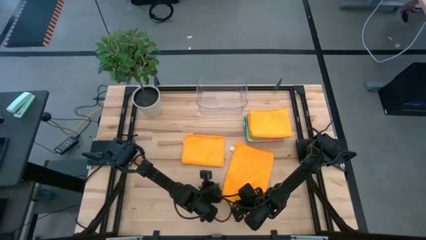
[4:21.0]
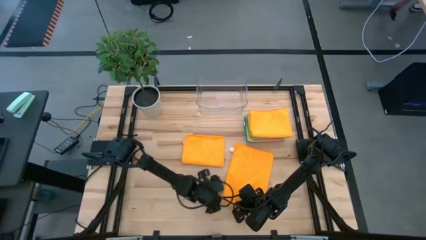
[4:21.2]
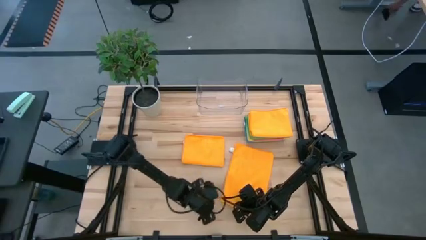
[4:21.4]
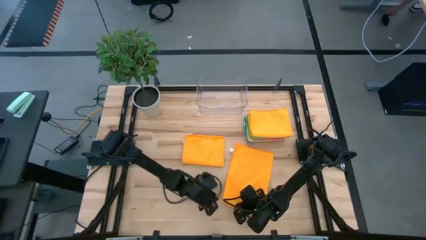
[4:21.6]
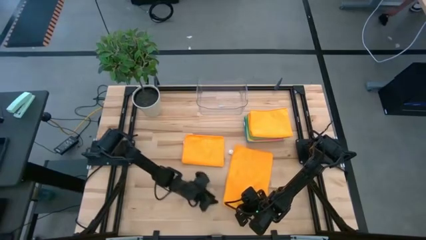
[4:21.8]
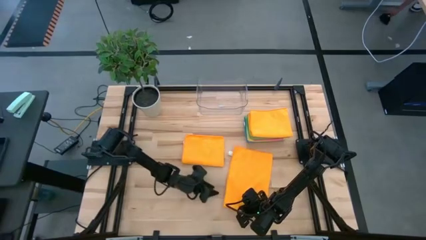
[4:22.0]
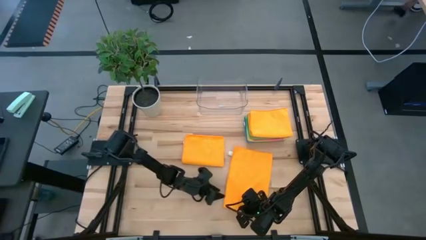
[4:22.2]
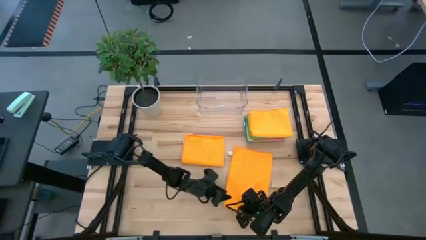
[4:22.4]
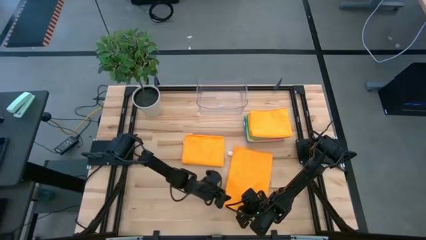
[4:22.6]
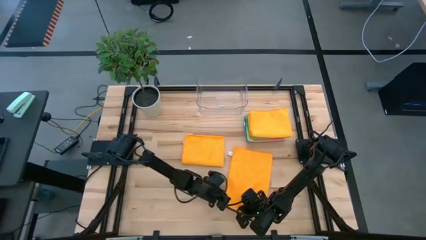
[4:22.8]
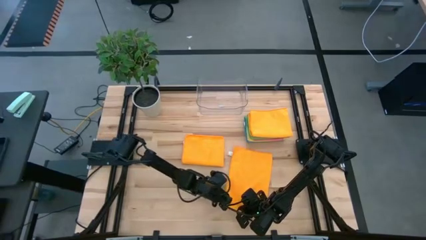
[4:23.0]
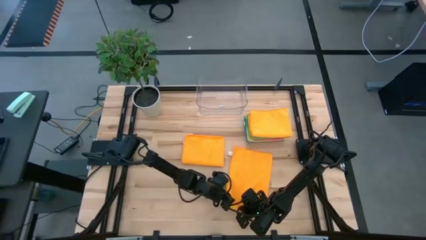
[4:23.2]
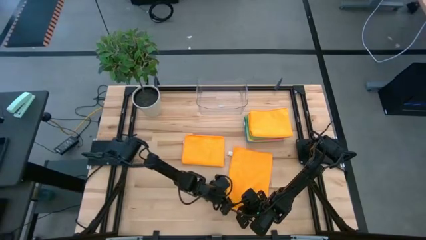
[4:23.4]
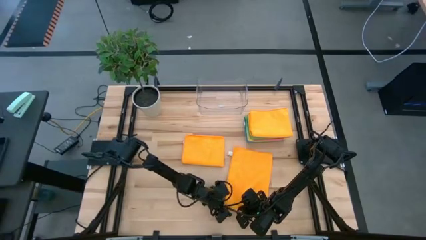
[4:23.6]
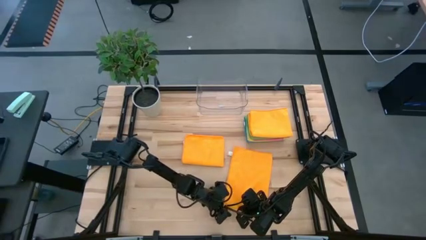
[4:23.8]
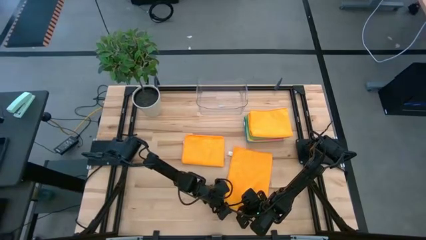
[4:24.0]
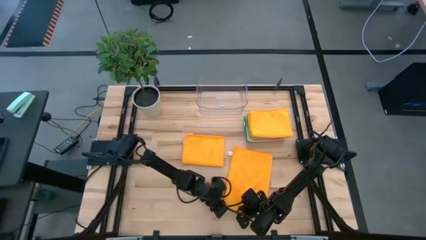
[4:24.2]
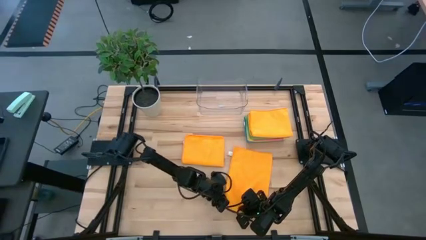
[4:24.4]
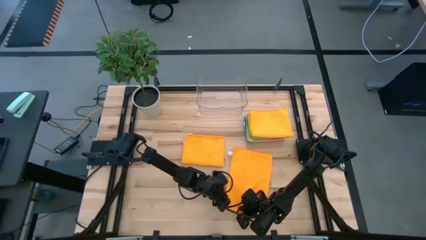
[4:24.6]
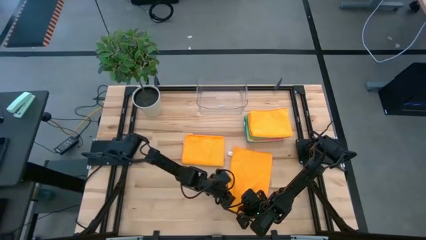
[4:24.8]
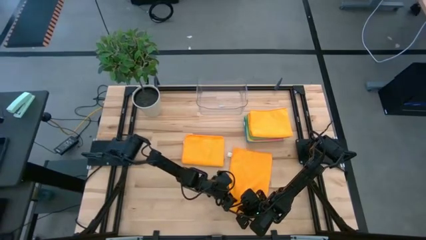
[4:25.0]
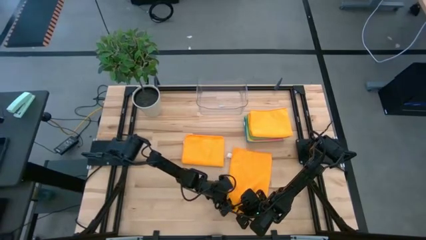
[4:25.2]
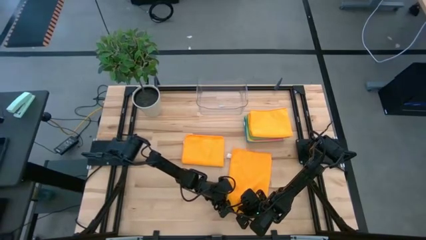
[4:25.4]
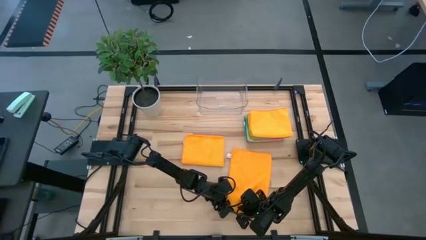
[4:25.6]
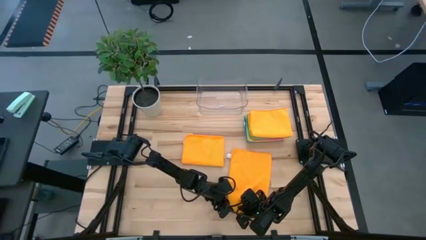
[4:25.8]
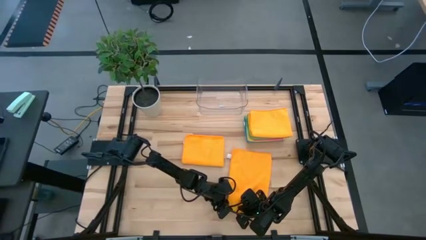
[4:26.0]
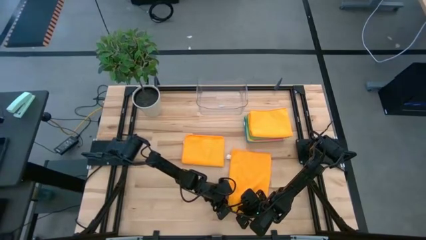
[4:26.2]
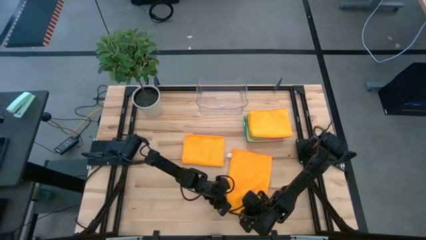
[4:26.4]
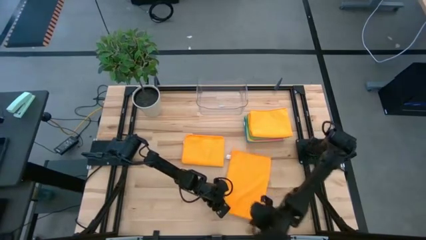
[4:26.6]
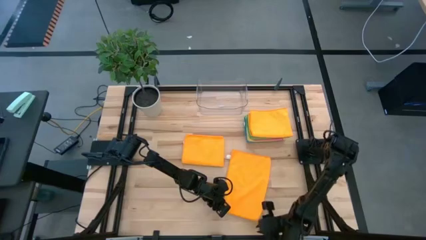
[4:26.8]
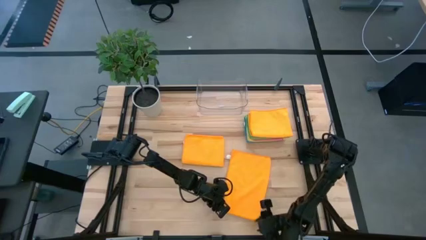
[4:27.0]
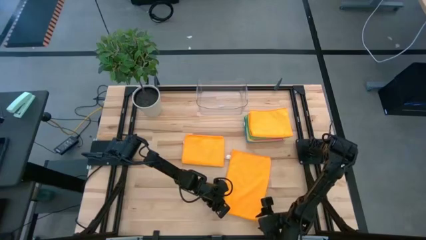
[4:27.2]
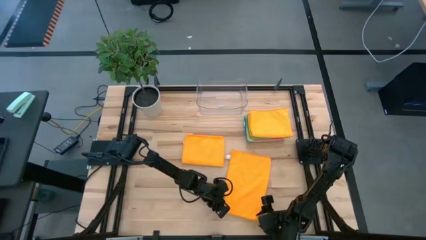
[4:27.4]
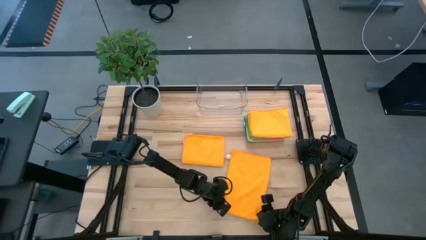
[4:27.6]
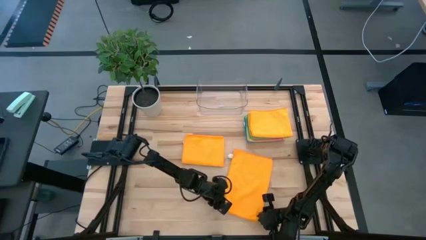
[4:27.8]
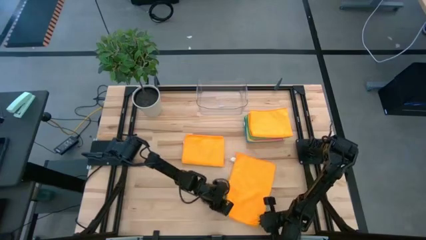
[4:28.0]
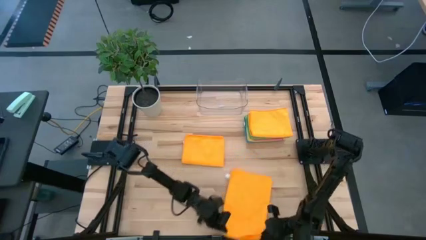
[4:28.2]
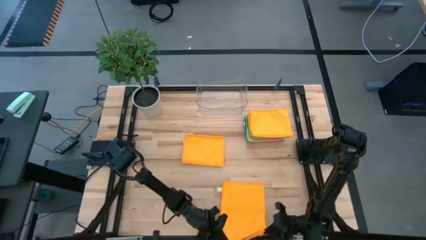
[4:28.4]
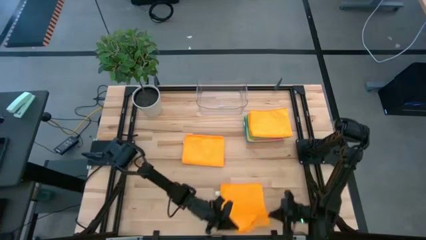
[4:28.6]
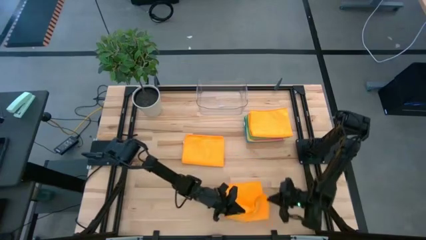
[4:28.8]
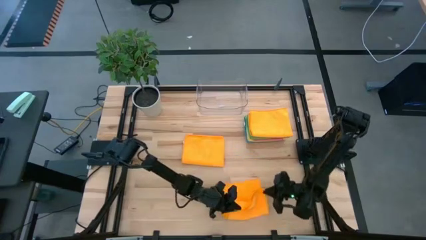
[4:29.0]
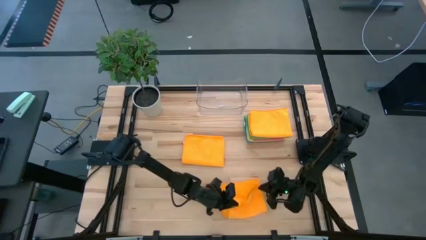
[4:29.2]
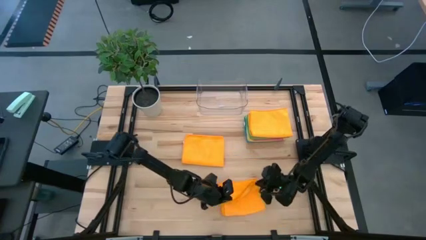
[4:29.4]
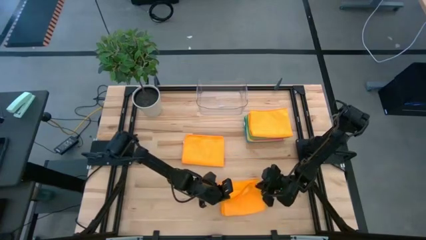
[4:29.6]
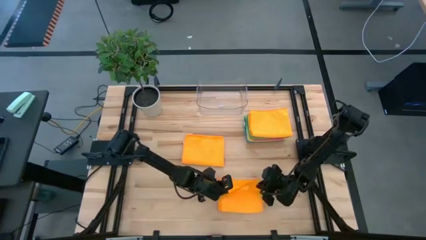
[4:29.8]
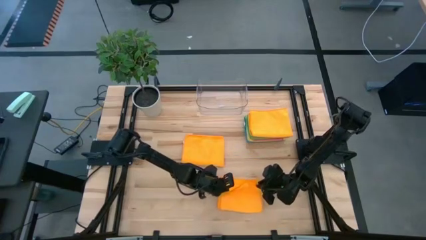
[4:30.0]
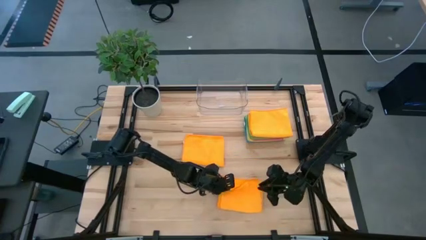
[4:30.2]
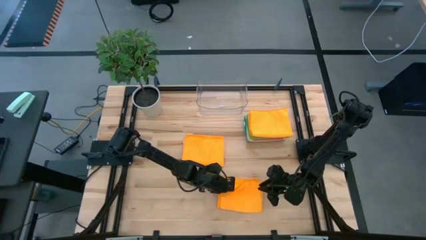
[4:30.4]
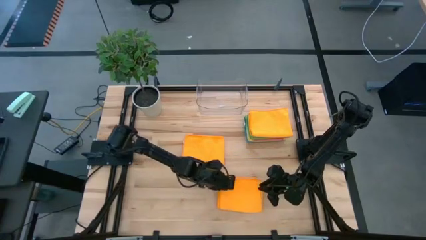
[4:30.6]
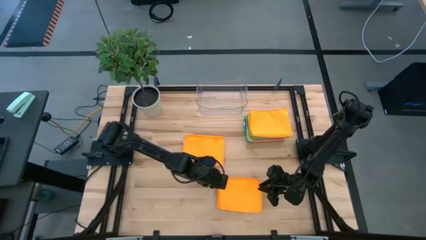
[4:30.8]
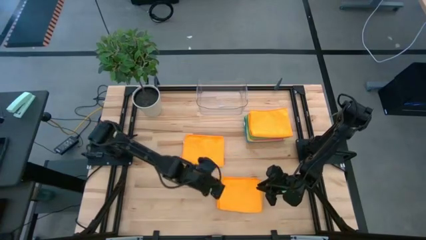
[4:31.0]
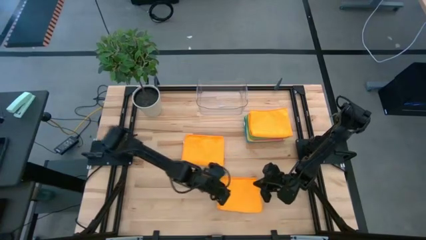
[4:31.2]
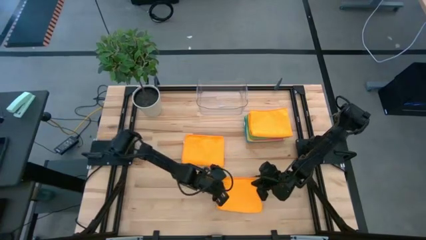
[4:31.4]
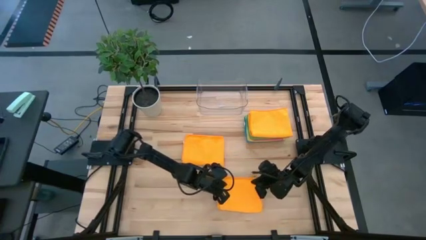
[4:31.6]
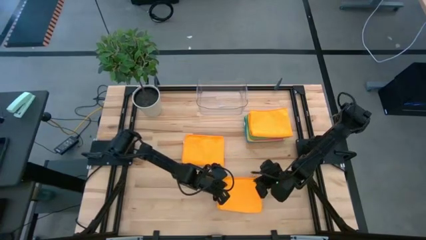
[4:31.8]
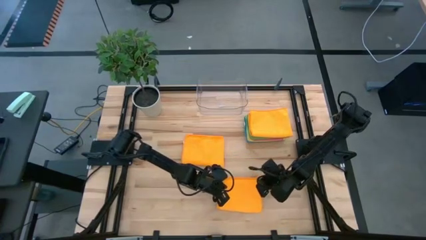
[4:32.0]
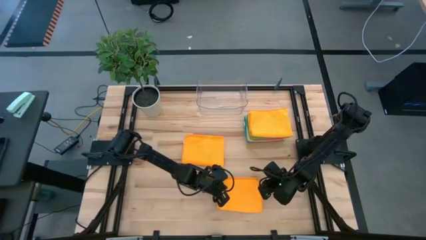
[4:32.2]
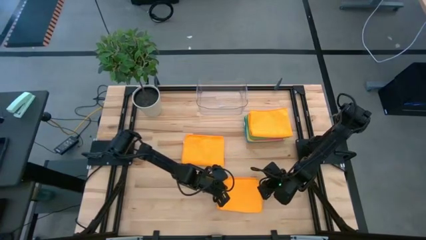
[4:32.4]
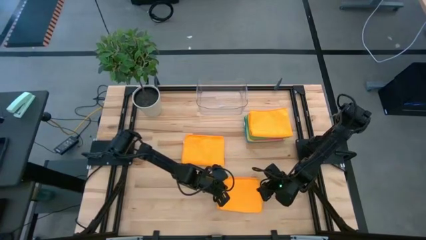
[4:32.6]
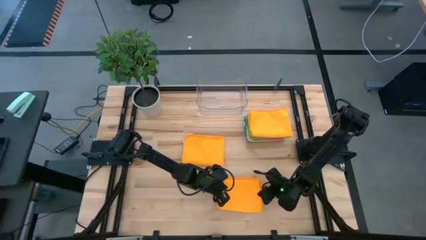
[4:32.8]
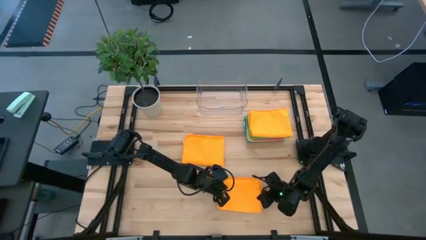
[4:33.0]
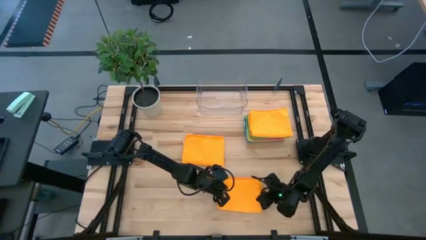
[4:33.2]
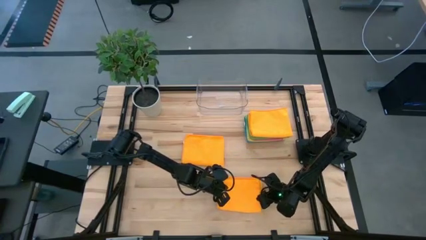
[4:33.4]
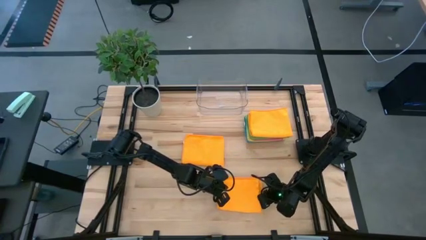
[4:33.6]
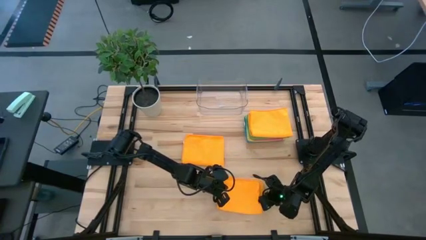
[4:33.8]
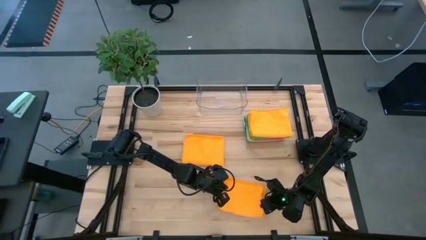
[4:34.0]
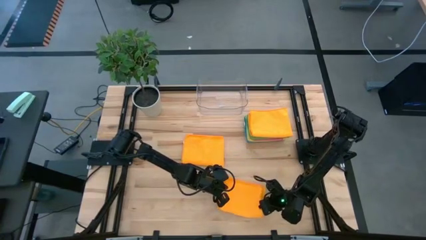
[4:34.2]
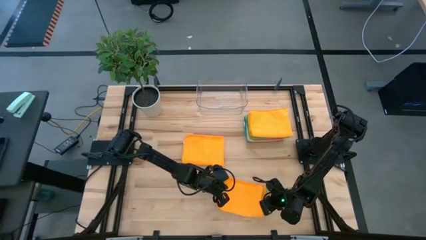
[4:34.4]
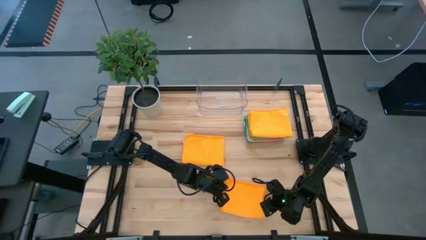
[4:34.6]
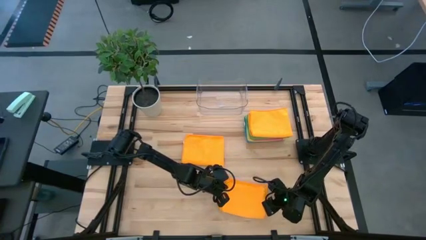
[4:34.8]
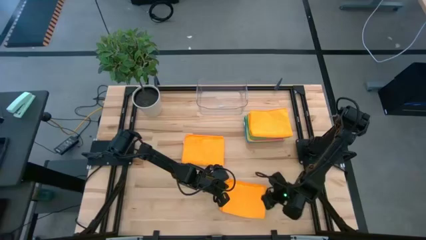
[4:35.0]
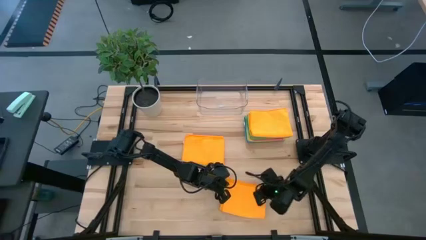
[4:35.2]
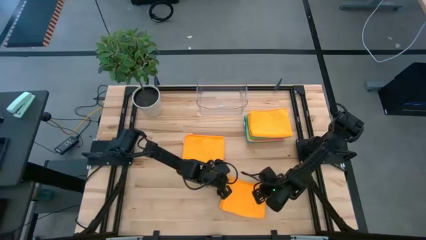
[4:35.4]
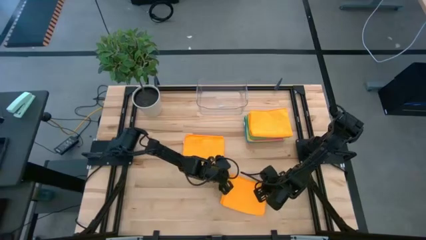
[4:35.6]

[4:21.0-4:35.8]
Task: Fold microfiber towels
Fold the bottom orange towel

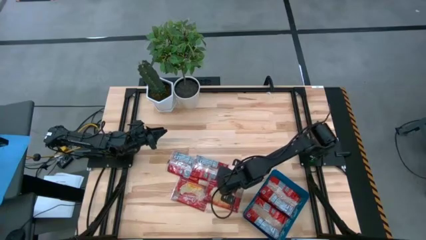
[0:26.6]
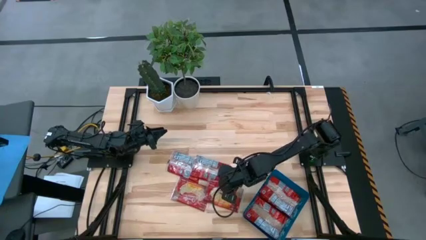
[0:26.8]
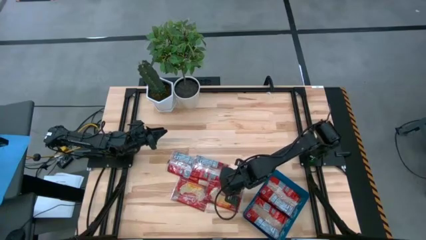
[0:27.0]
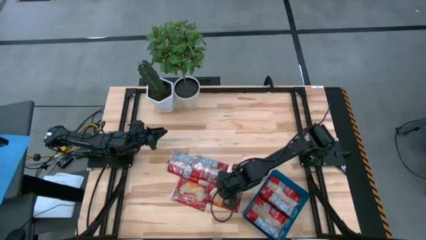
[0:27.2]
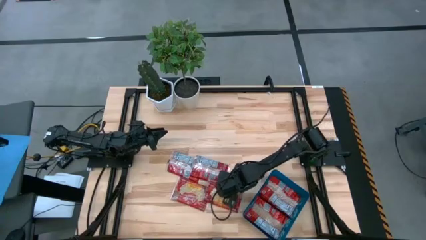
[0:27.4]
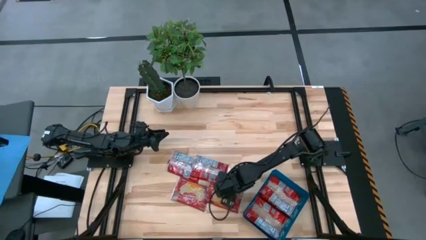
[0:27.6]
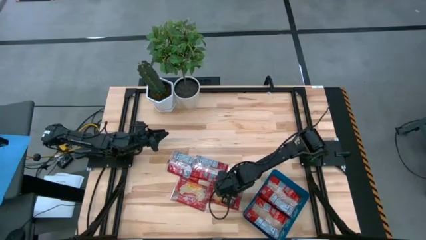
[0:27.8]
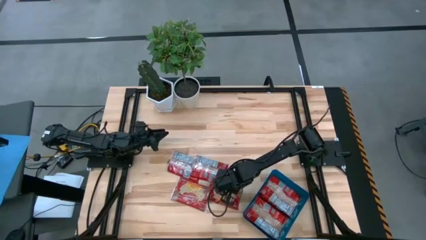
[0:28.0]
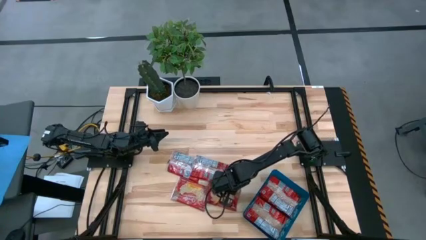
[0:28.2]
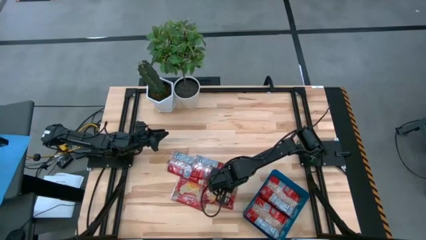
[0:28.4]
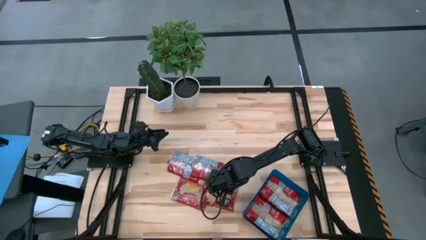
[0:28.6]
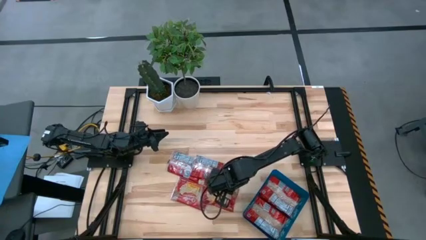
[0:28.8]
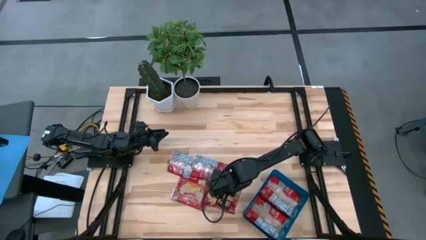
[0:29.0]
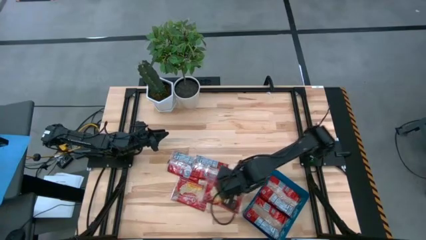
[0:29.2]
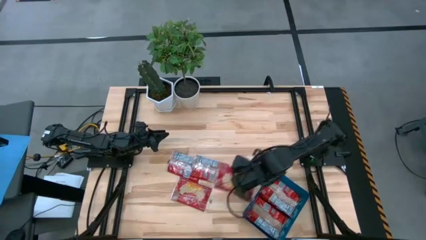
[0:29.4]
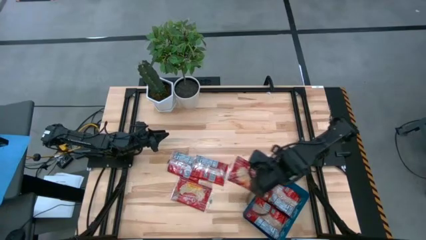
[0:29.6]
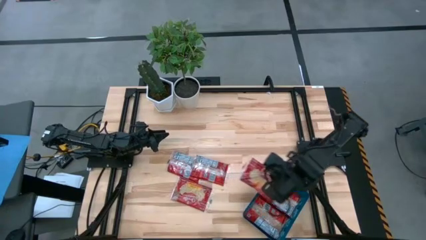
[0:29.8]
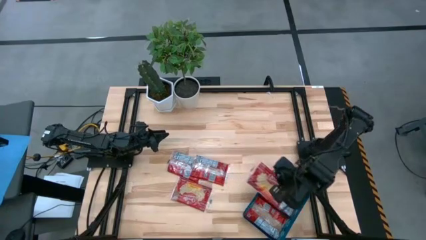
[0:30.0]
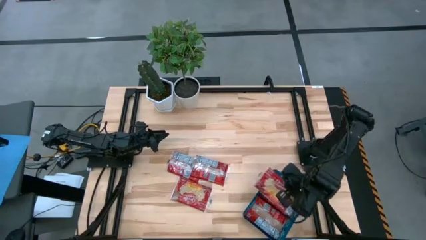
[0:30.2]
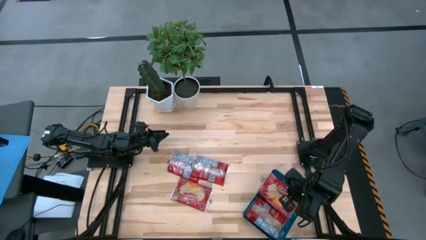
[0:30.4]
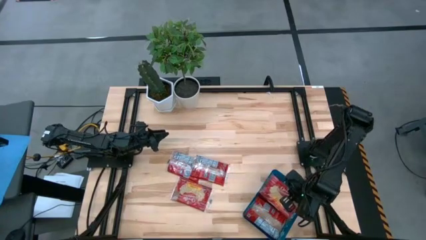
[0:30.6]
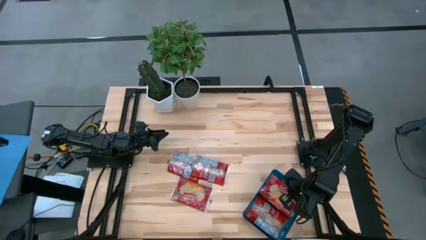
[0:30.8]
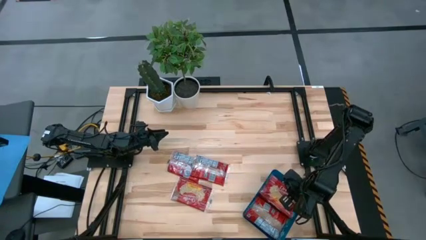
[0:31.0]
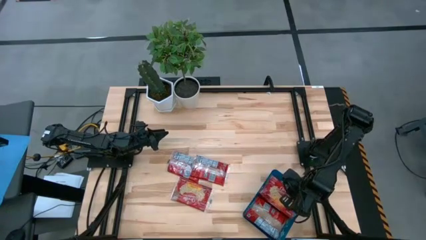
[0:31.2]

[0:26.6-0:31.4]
Task: Sort popcorn bags into baskets
Put the red popcorn bag into the blue bin
